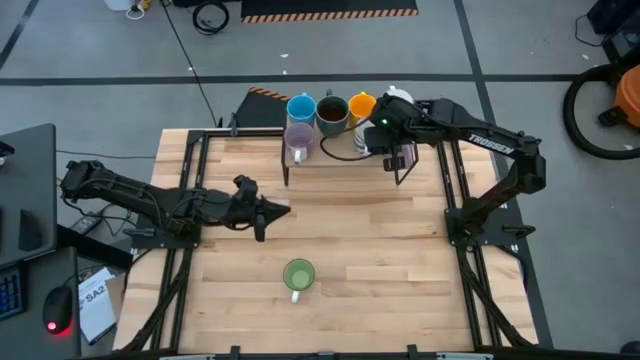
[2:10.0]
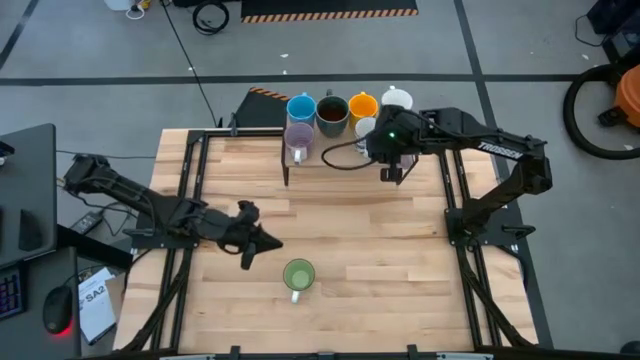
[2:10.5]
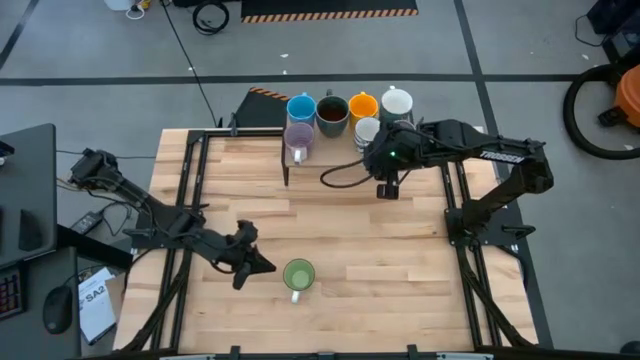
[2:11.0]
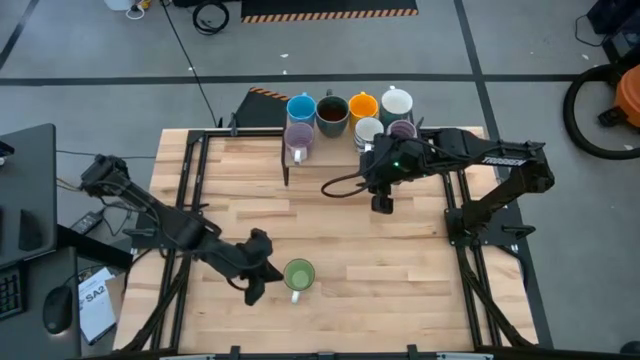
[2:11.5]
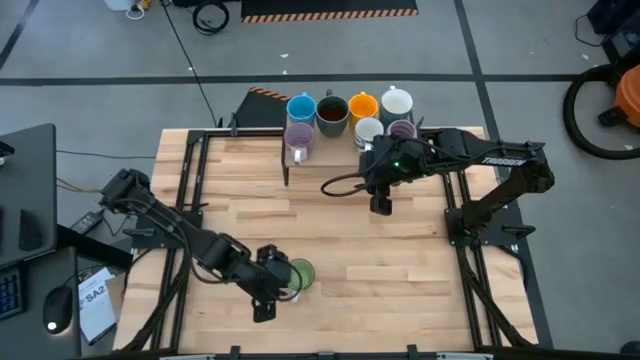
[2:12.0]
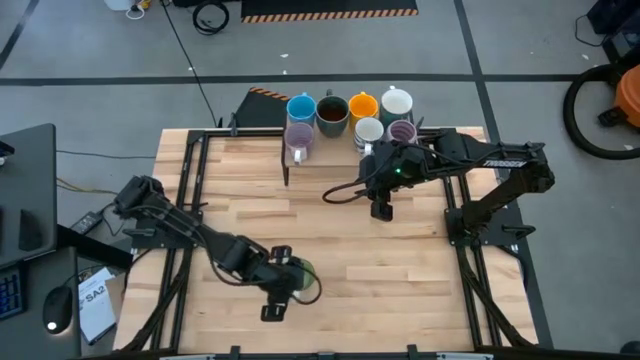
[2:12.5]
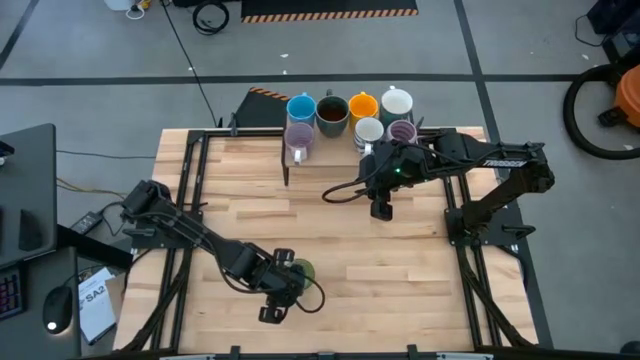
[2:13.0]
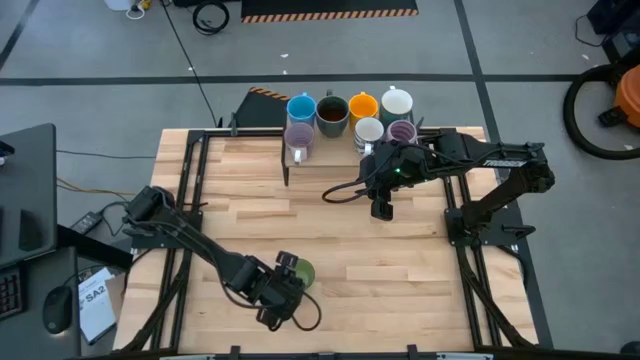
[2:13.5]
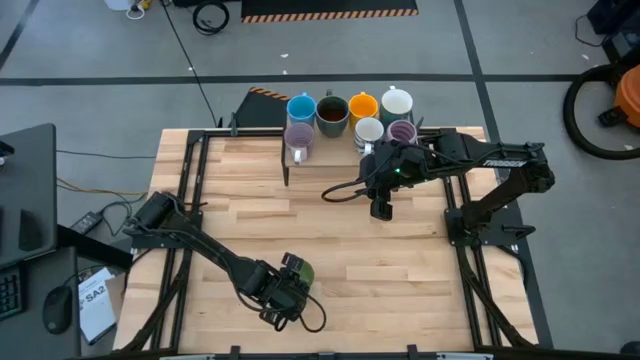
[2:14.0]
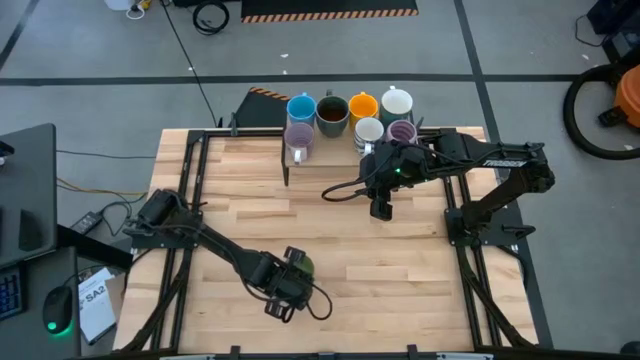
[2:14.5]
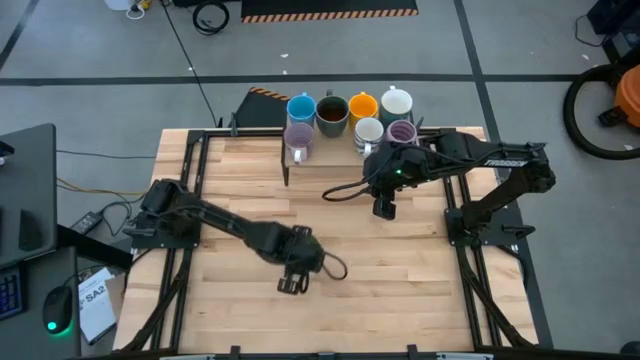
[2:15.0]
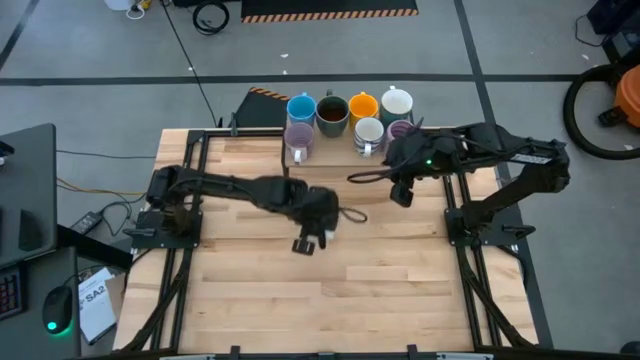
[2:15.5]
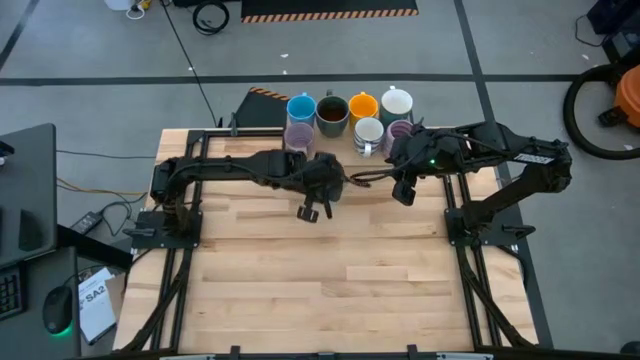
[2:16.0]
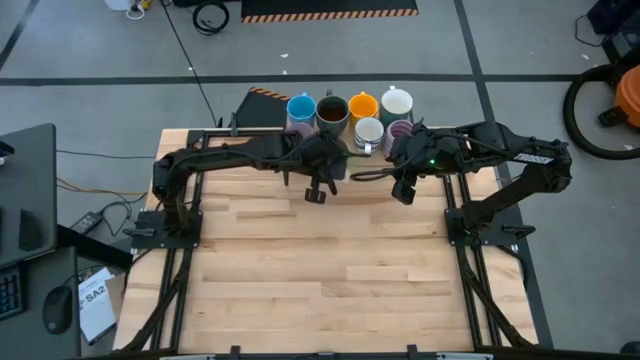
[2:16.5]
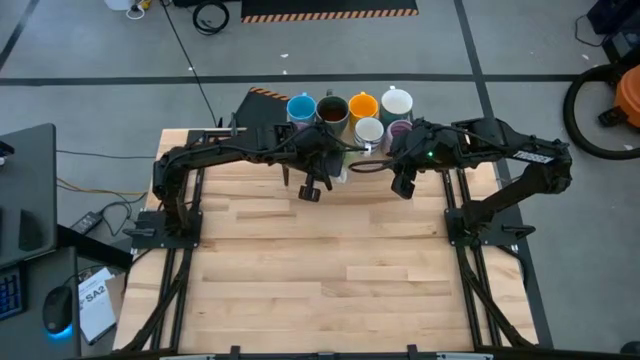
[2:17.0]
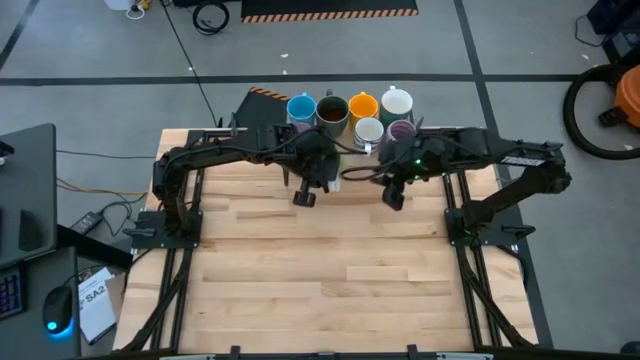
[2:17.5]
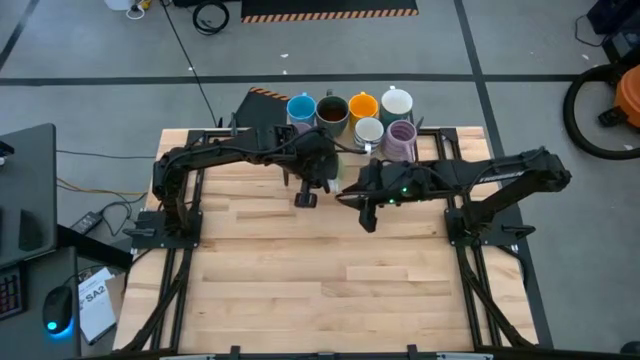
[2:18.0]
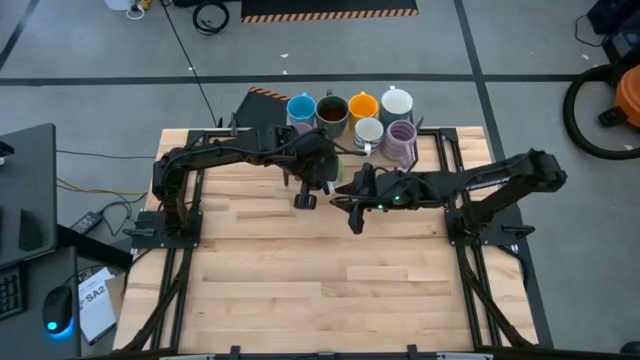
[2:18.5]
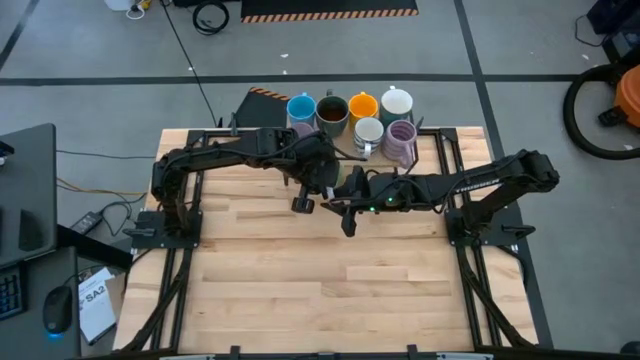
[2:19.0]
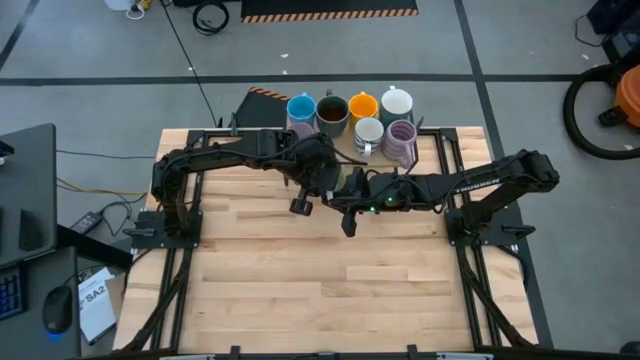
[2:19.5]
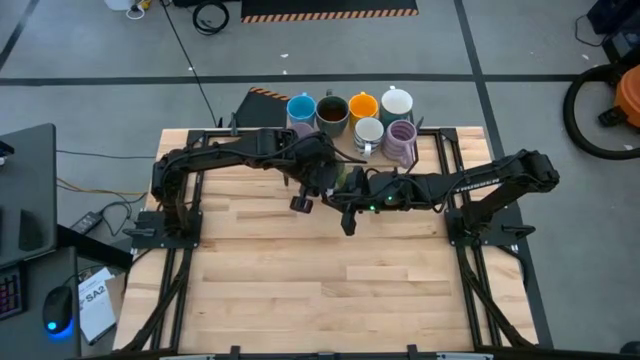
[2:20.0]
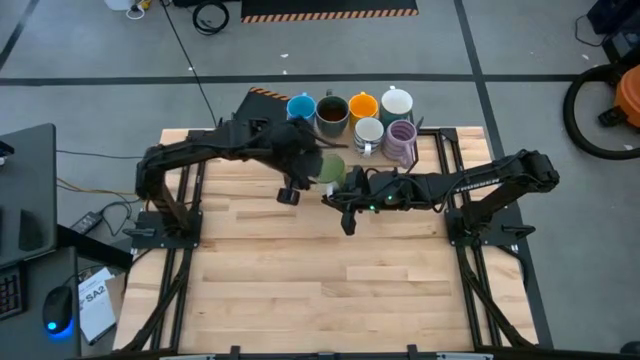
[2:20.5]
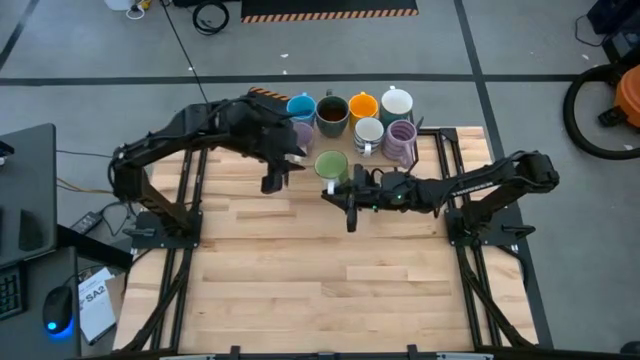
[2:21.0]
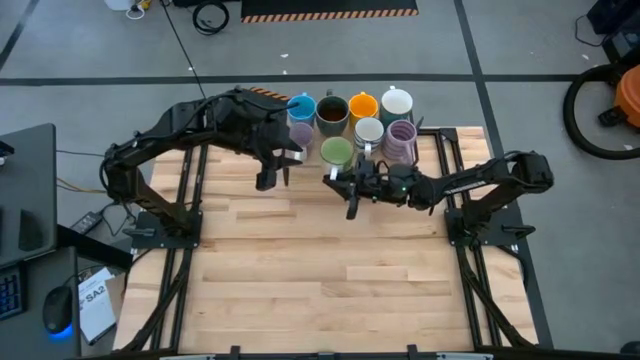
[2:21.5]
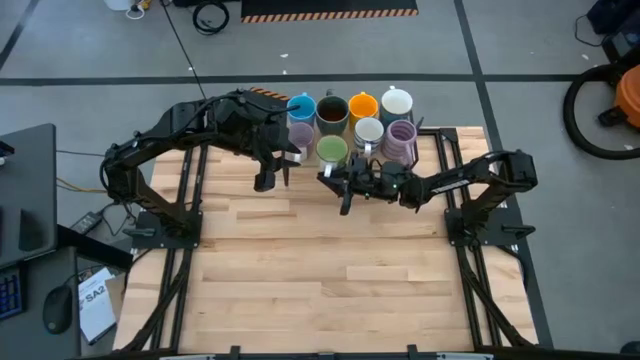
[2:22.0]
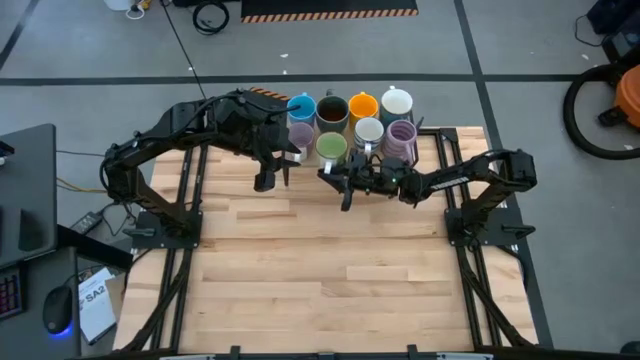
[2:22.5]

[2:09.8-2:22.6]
Task: Place coffee mugs
Put the green mug on the shelf

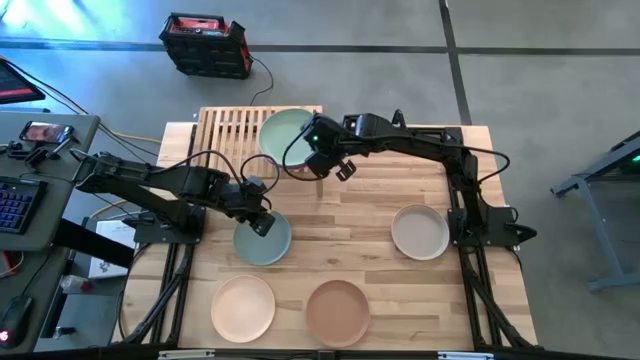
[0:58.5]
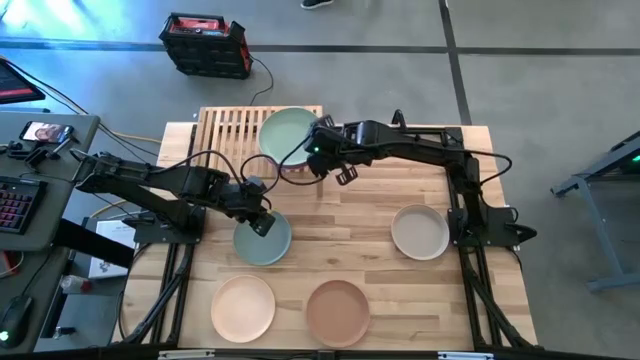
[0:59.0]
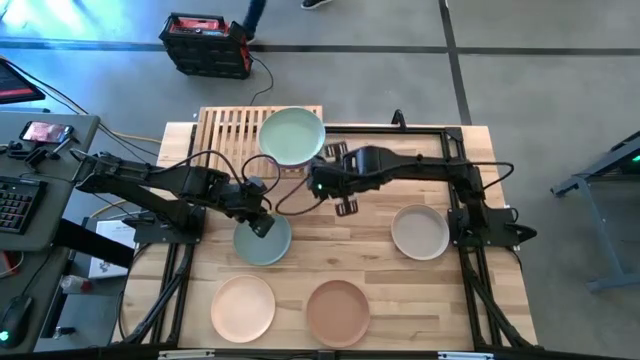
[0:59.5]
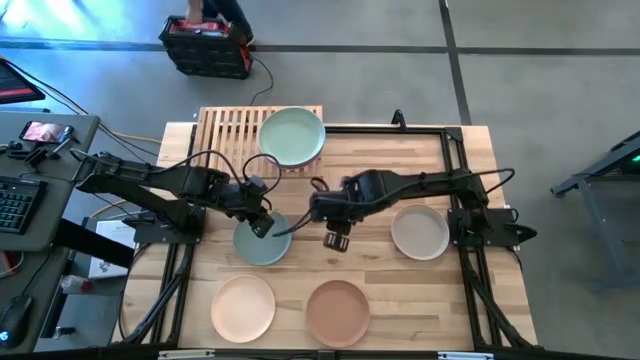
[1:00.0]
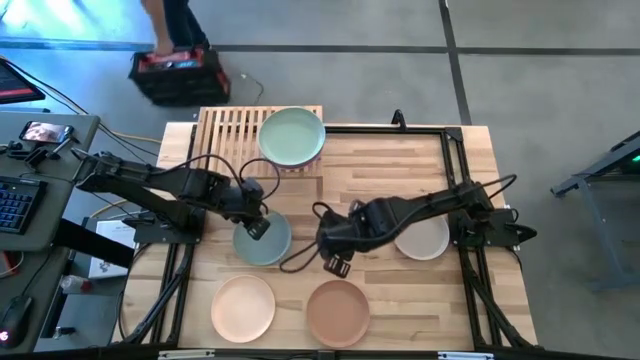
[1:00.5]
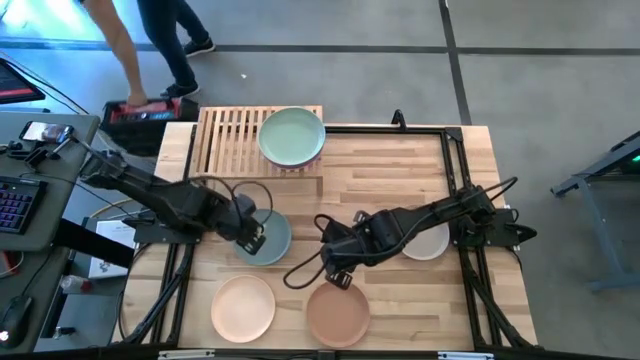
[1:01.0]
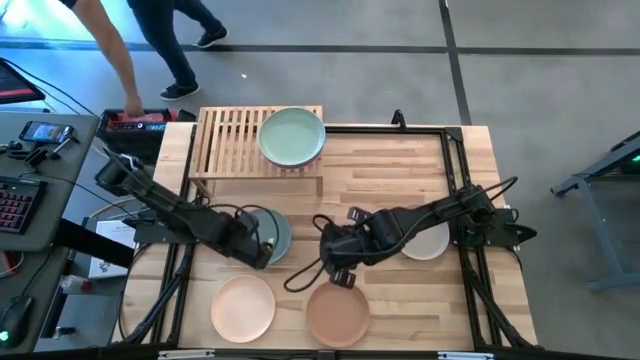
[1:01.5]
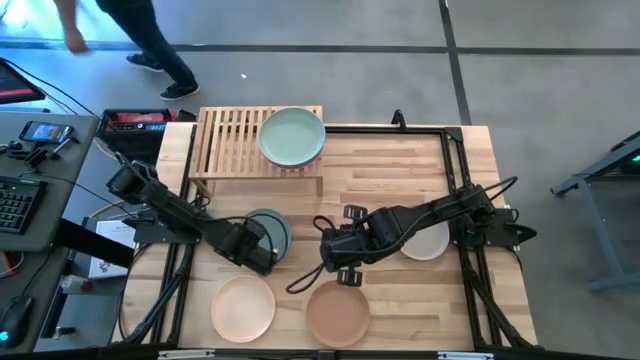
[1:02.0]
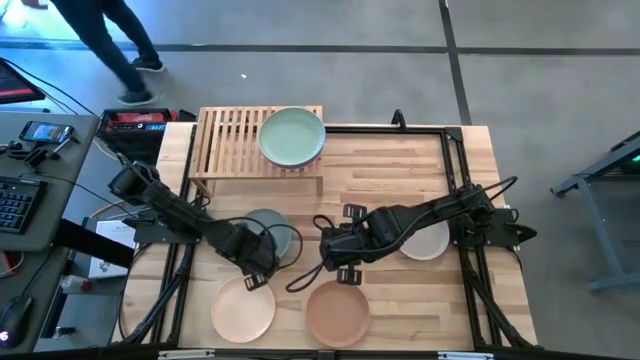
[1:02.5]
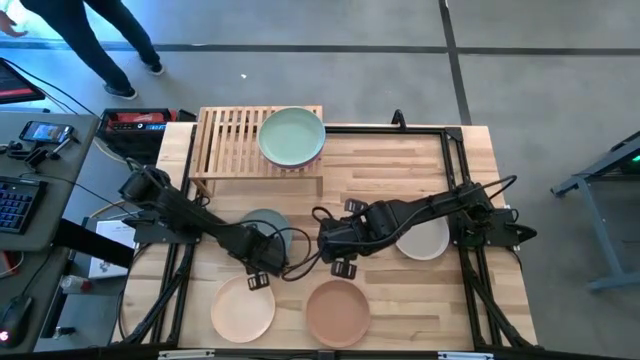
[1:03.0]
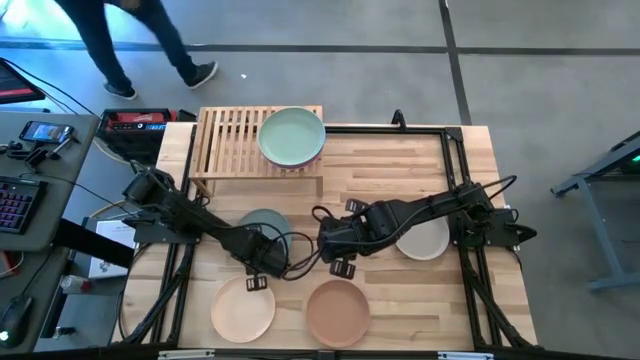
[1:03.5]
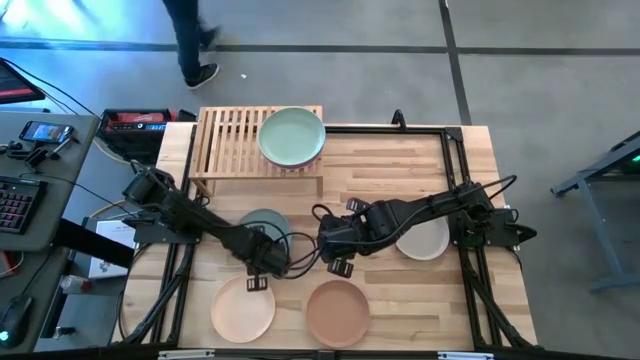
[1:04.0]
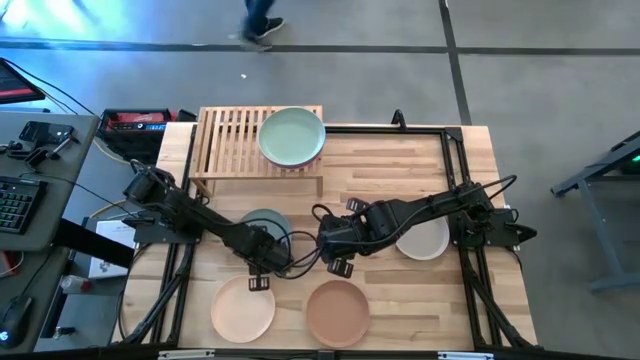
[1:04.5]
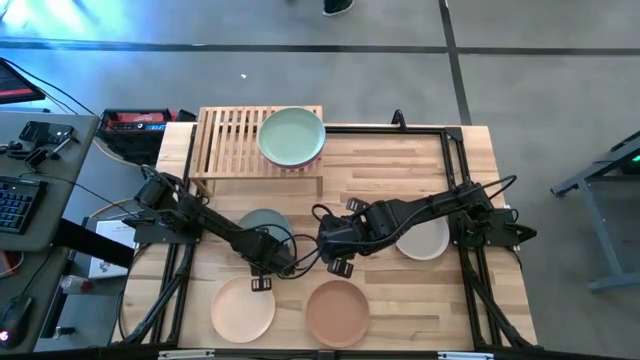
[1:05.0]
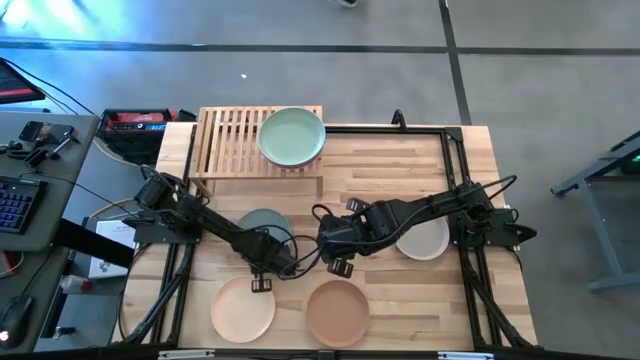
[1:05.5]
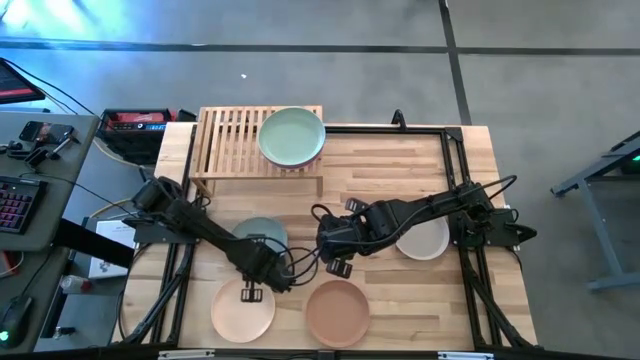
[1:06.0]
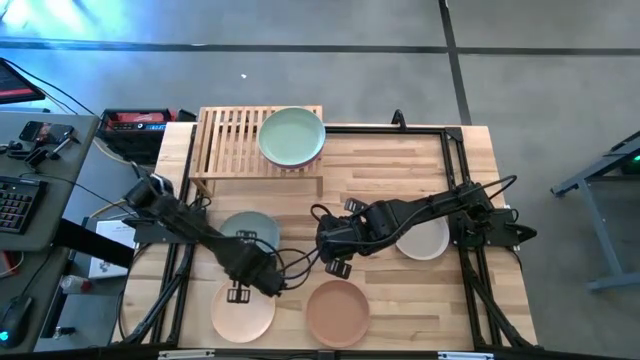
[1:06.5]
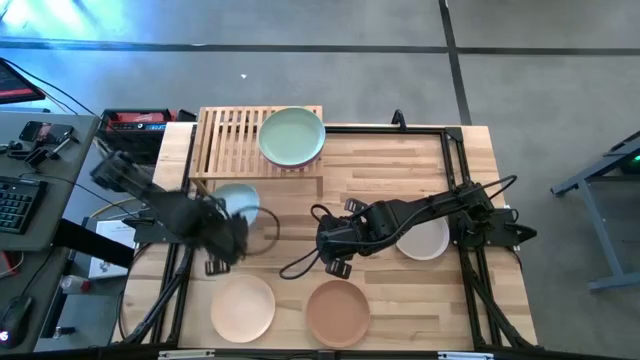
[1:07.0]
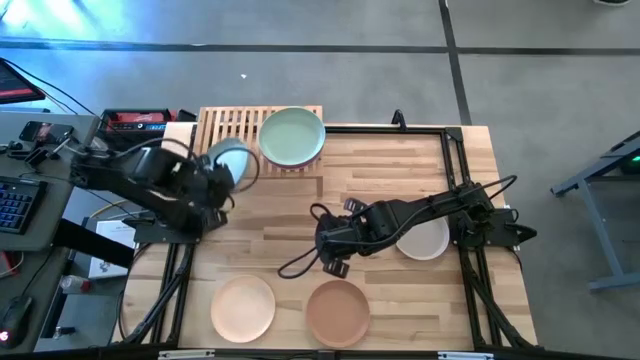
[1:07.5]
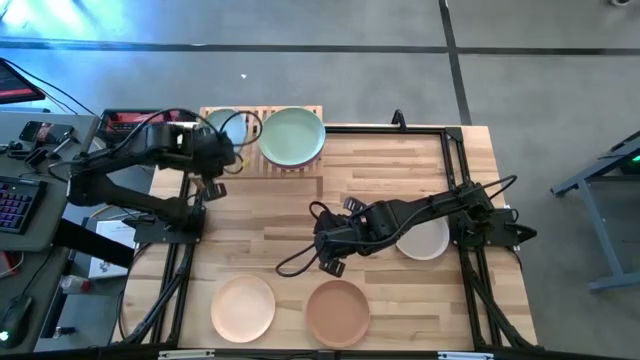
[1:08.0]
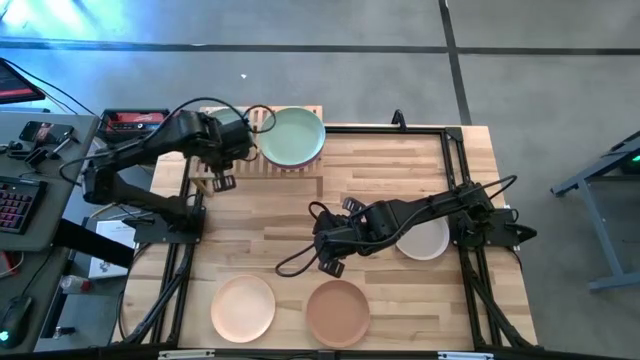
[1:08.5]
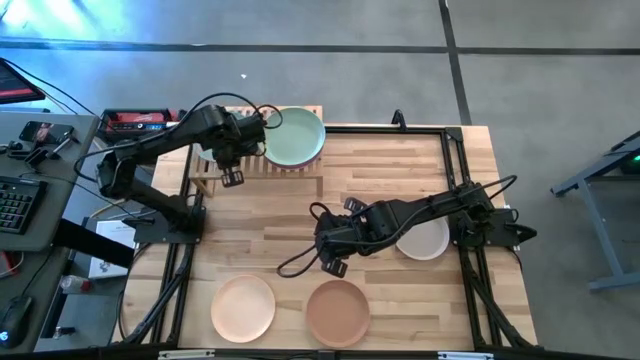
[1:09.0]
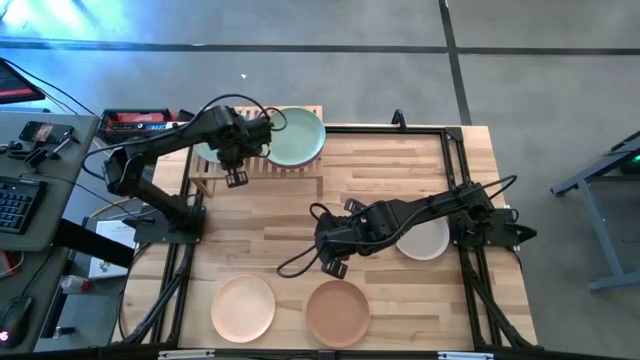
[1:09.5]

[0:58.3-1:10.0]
Task: Place and stack plates onto a shelf
Put the blue plate on the shelf
